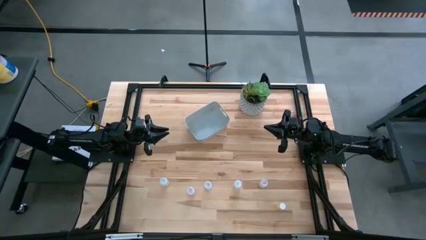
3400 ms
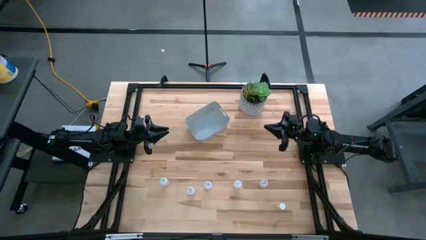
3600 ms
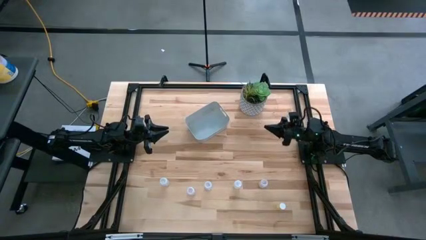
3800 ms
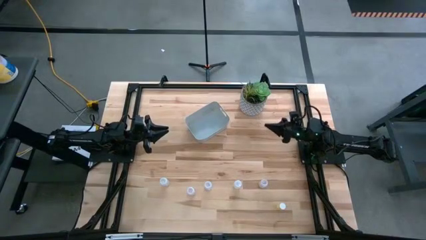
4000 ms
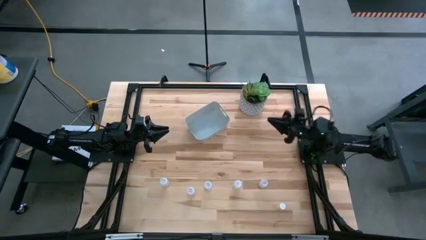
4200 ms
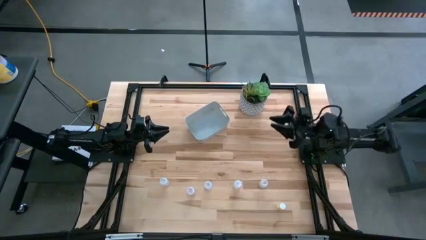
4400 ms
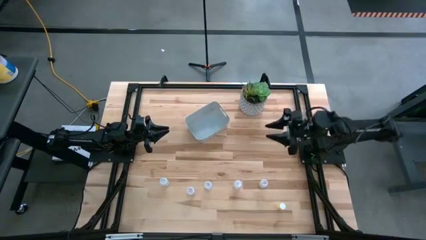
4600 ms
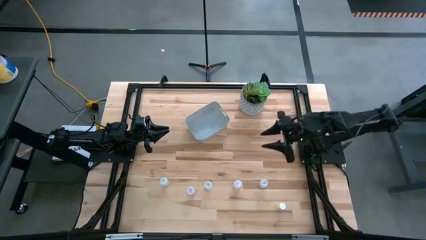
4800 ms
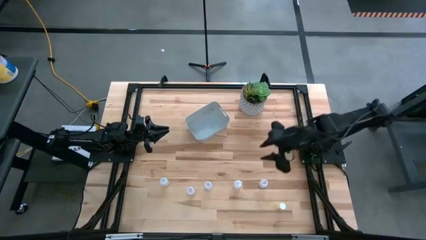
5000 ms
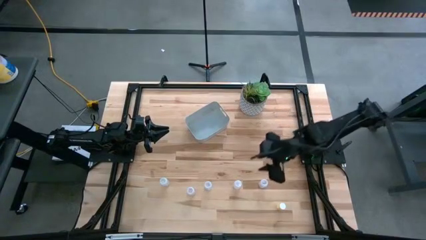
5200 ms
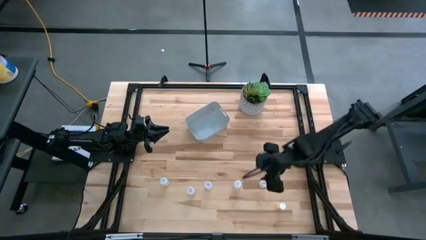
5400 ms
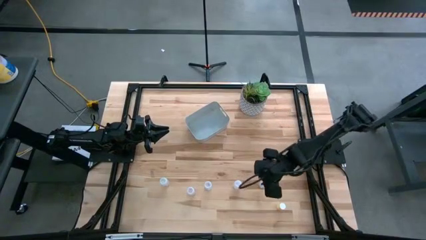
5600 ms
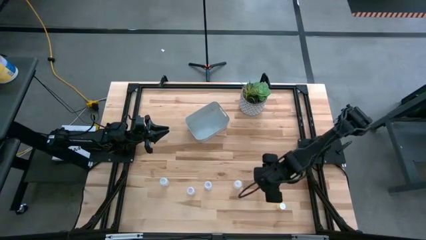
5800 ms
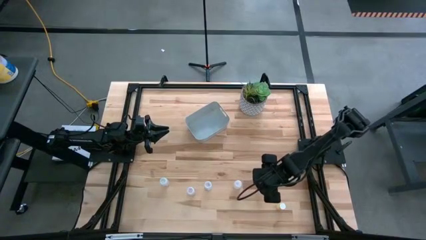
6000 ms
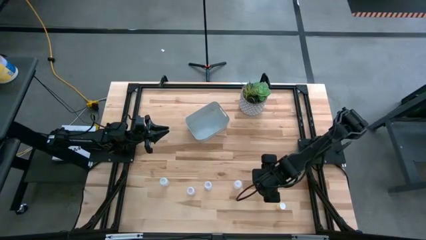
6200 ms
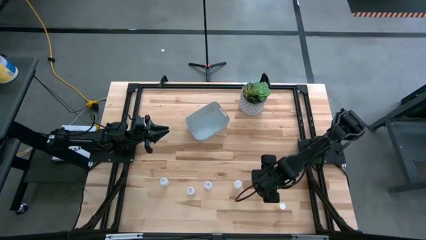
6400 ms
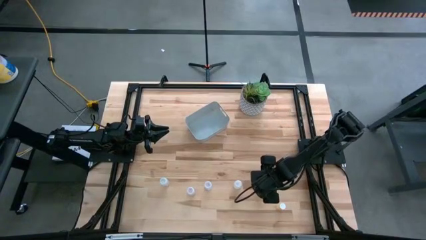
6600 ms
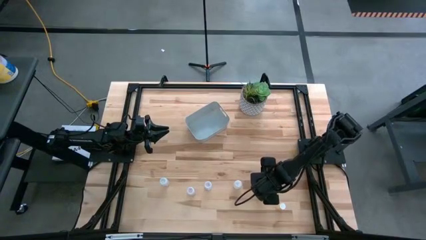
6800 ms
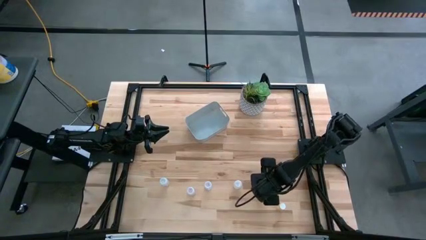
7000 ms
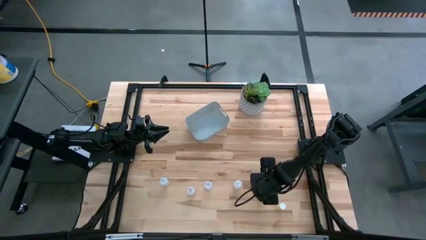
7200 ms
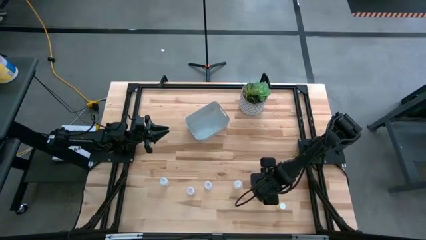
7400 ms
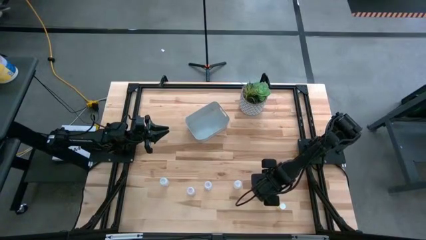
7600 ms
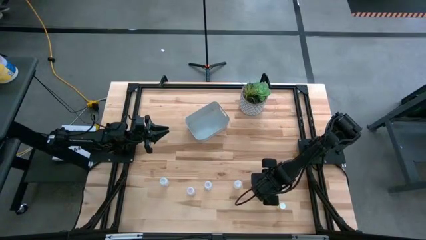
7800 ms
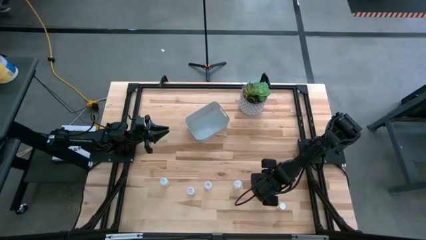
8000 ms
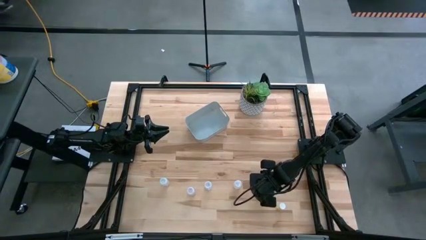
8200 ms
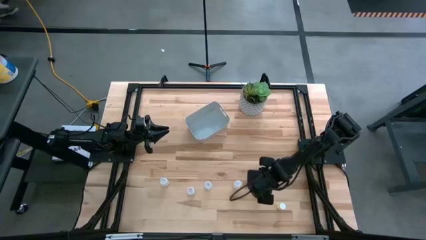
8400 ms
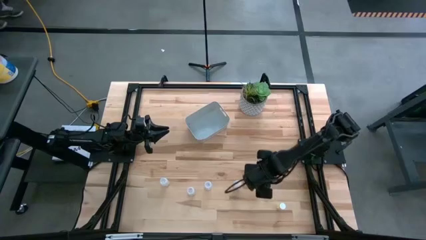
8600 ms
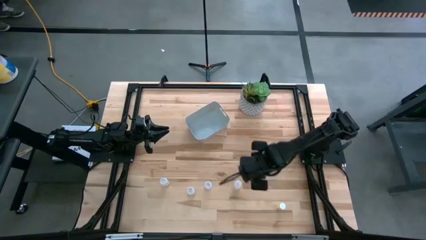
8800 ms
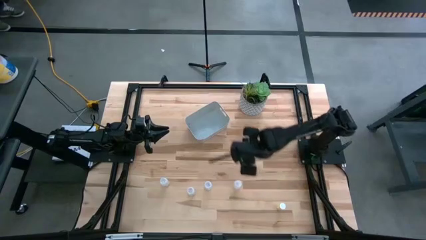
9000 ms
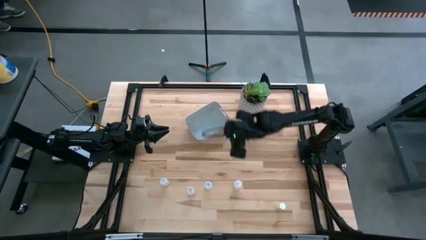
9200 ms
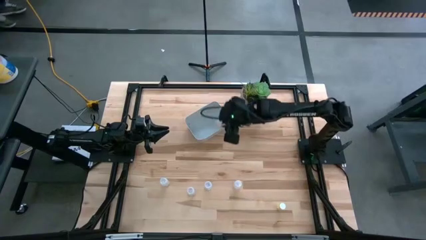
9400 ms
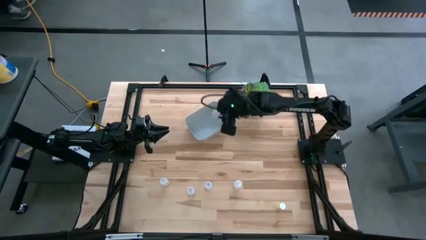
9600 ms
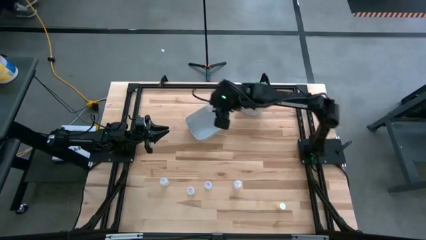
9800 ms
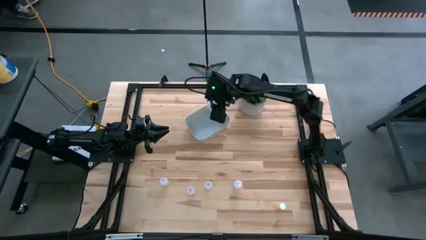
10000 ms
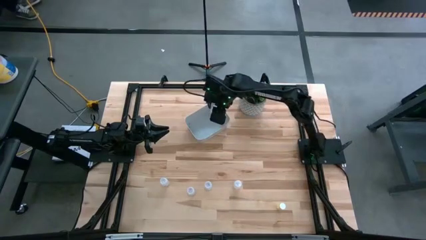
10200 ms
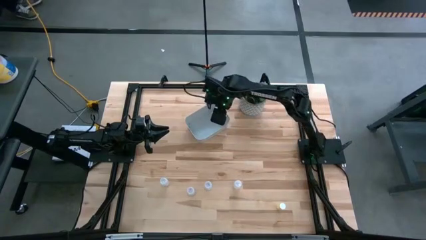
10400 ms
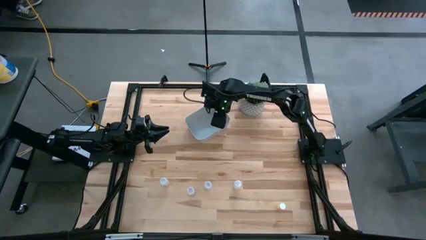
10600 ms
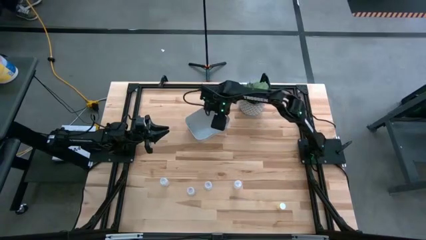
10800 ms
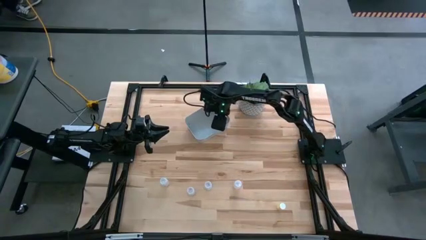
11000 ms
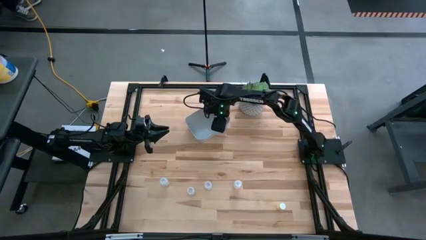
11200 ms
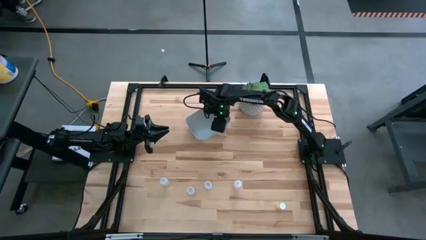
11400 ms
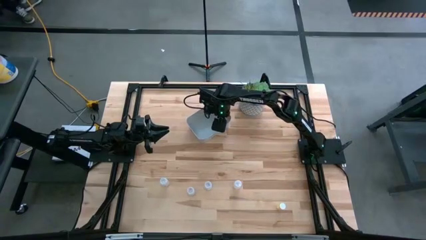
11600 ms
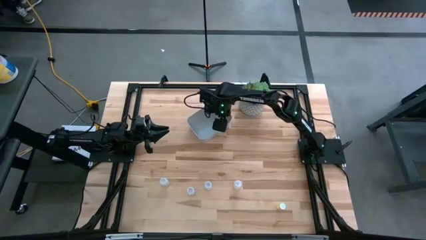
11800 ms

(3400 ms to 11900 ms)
Task: Pick and place pill bottles into a basket
Put the transparent medicine bottle into the white bin

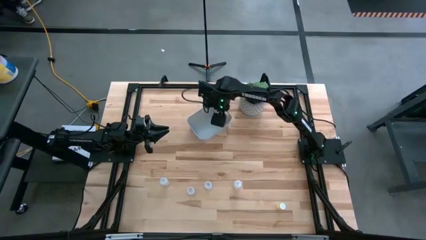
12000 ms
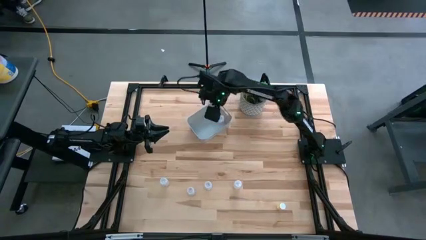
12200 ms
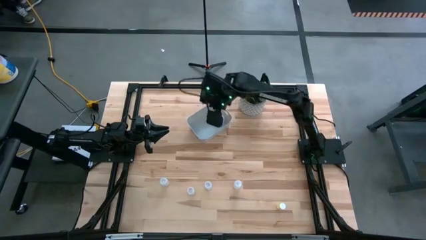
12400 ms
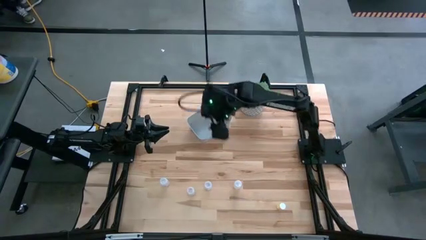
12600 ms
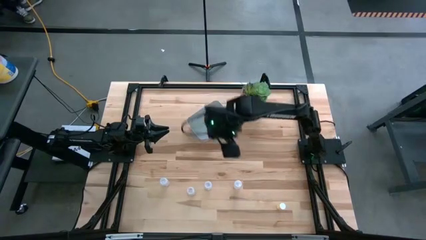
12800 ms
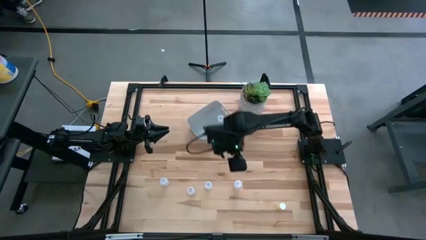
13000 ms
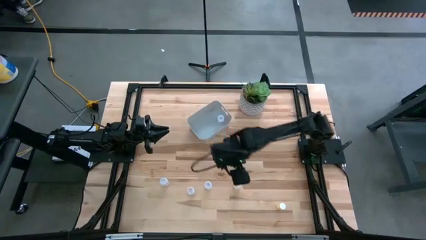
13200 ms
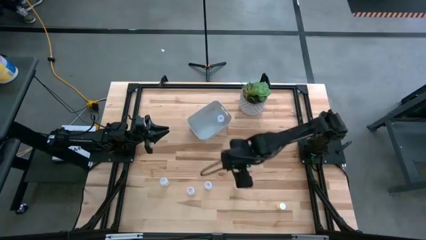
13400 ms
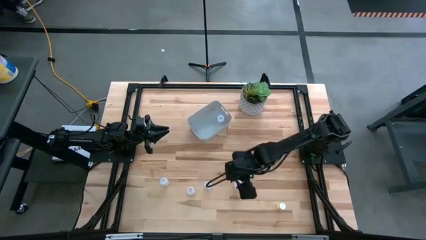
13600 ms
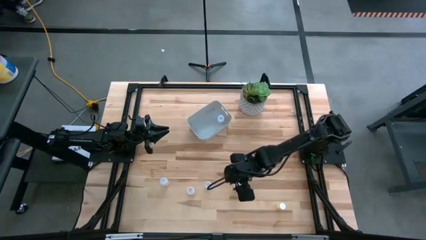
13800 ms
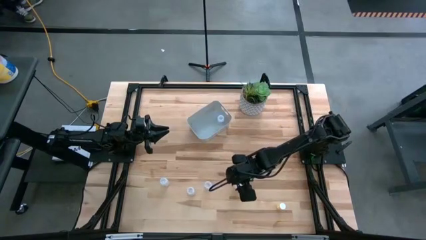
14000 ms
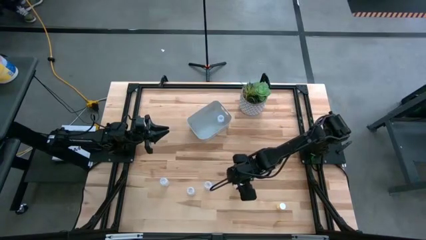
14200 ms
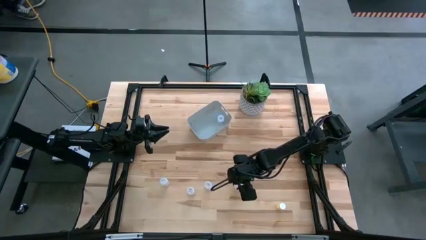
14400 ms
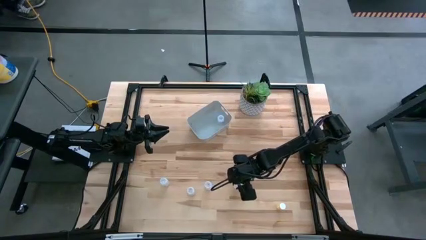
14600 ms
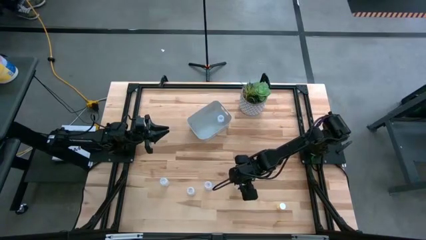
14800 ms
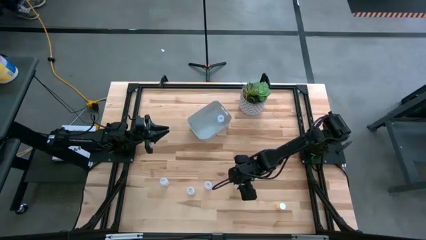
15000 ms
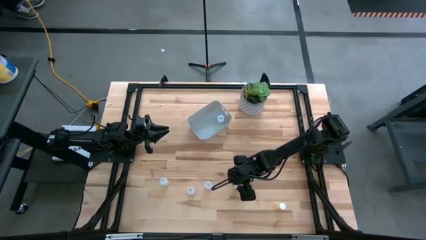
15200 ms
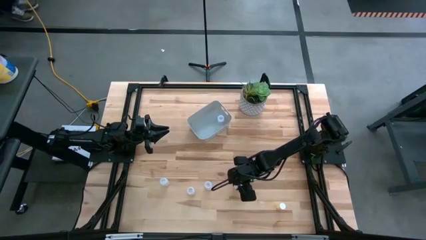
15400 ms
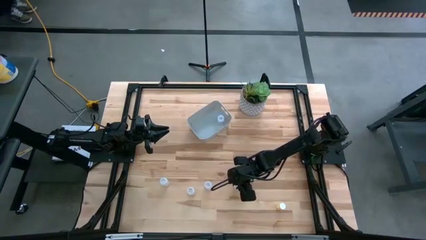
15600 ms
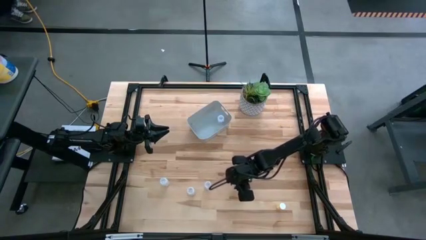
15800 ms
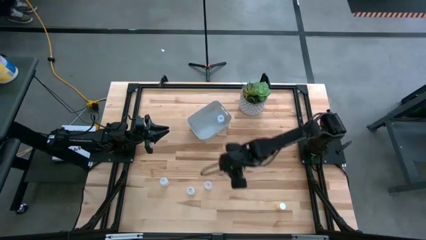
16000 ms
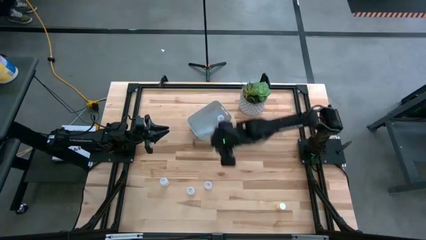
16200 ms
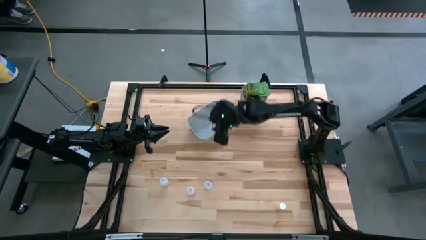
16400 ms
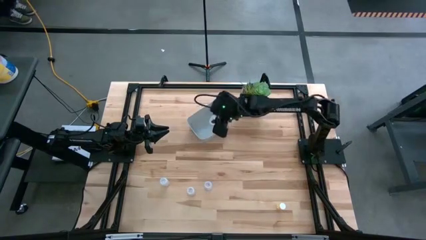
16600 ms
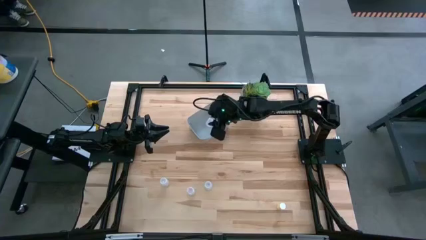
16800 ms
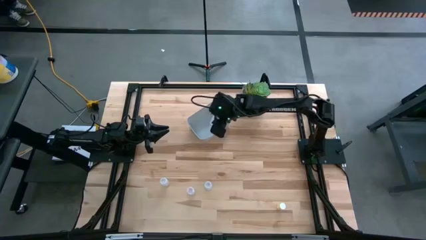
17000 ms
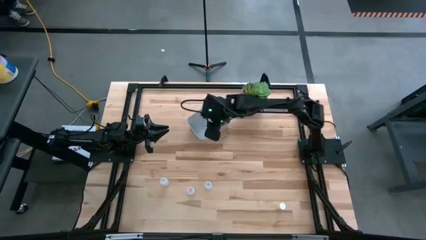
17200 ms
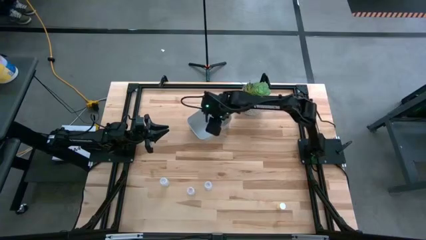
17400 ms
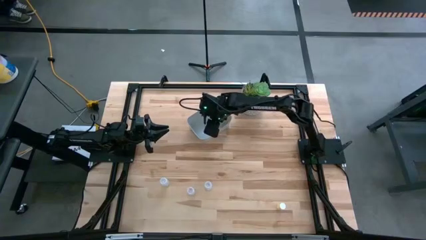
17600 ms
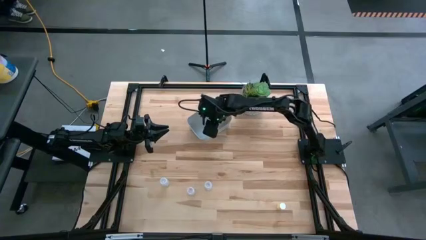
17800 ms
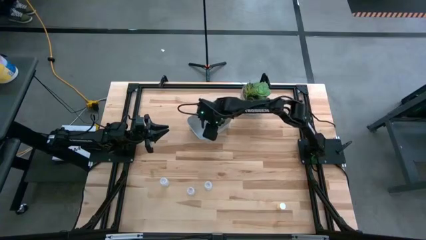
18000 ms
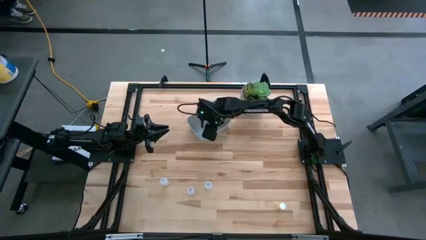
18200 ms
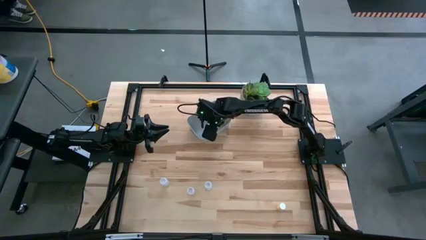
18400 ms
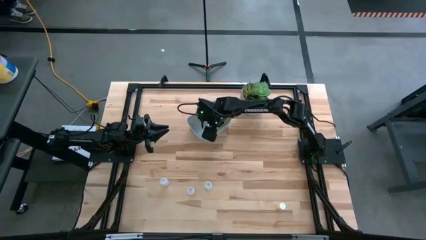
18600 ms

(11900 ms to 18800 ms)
Put the white medicine bottle into the white bin

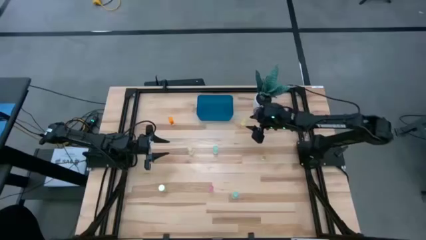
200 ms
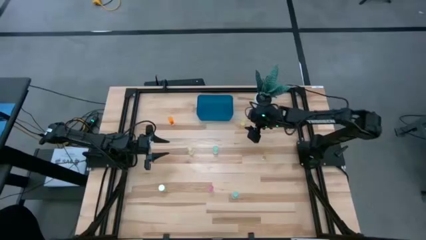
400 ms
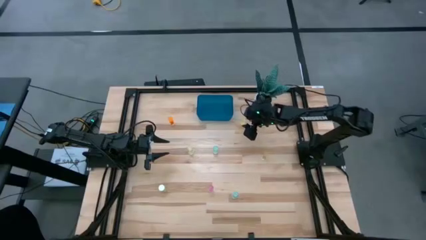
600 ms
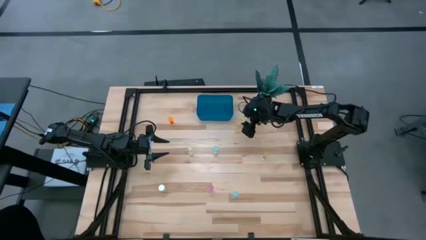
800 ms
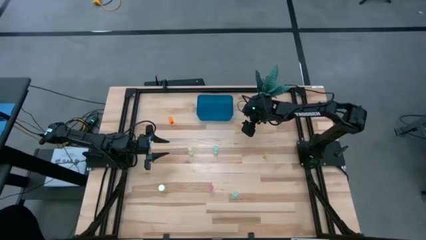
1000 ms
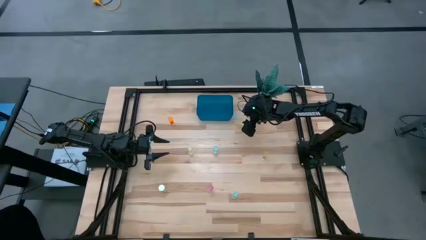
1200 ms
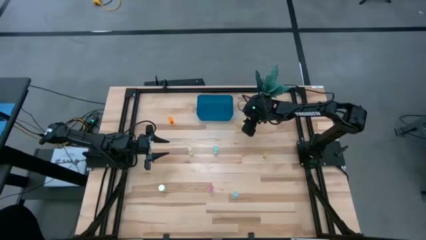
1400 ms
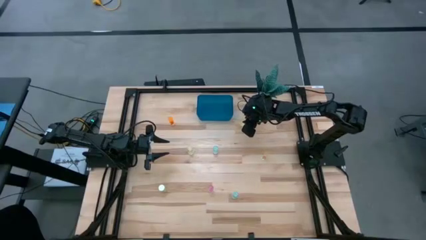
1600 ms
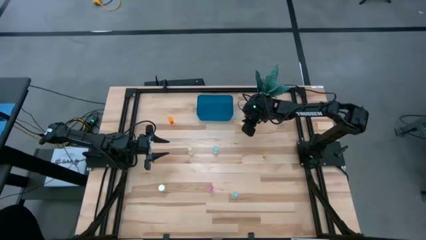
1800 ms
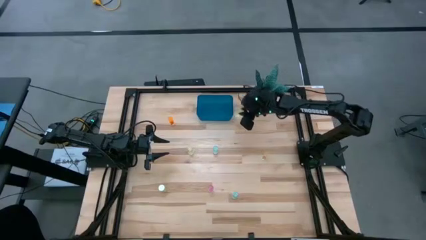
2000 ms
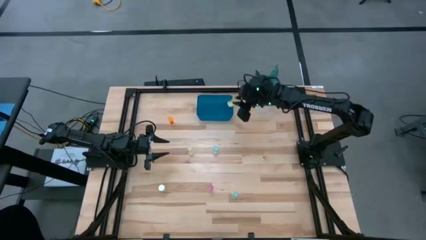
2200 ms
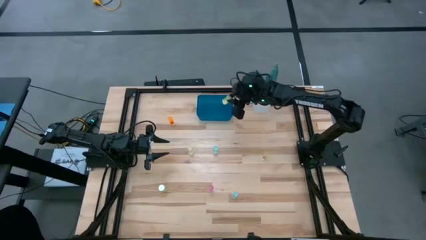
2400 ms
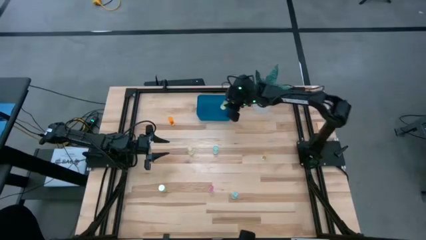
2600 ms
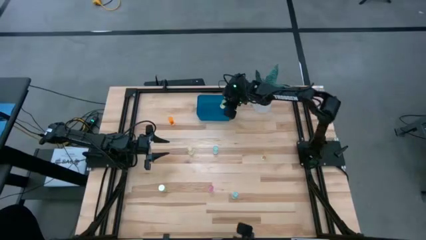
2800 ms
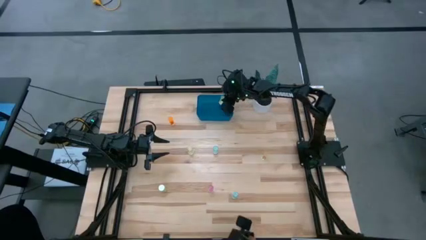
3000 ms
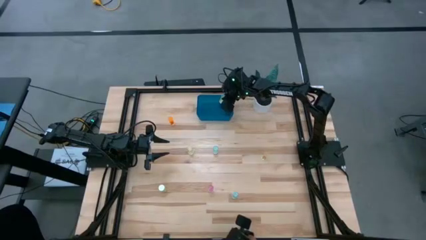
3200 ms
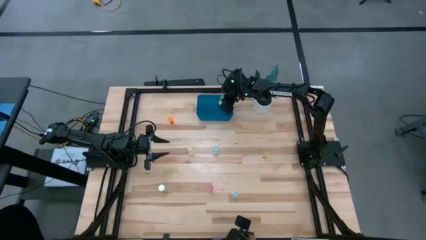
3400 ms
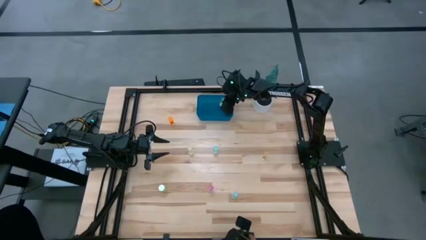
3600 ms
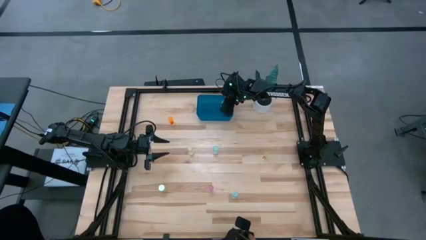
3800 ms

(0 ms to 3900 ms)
Task: Pick and place pill bottles into a basket
Put the yellow pill bottle into the blue bin
